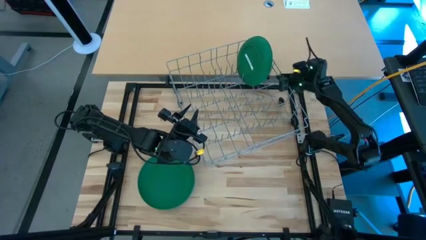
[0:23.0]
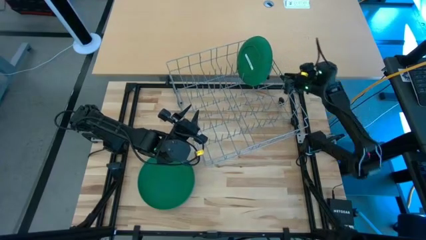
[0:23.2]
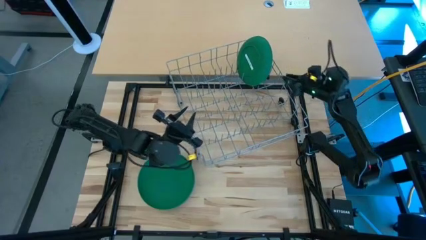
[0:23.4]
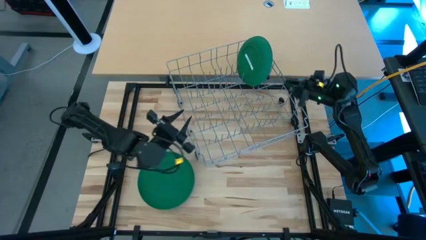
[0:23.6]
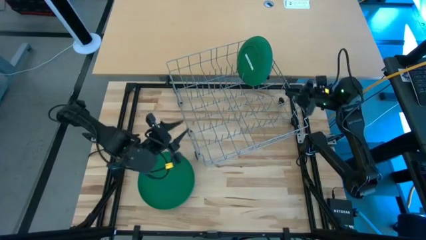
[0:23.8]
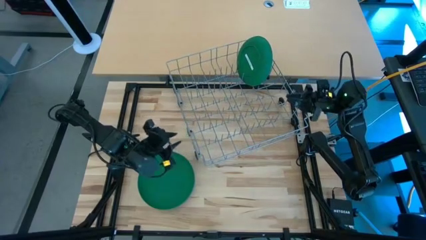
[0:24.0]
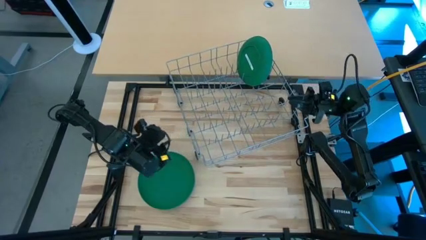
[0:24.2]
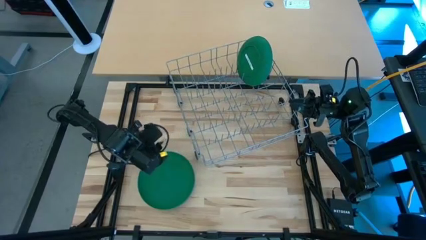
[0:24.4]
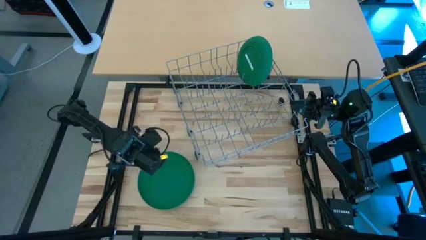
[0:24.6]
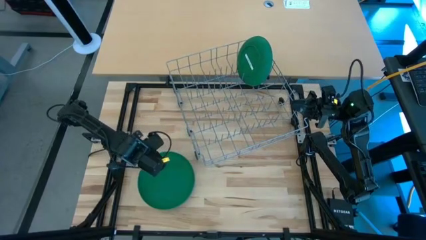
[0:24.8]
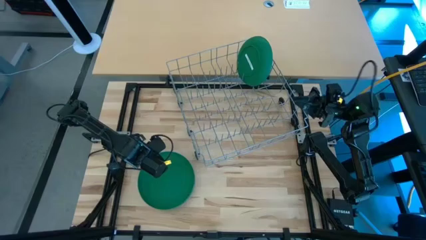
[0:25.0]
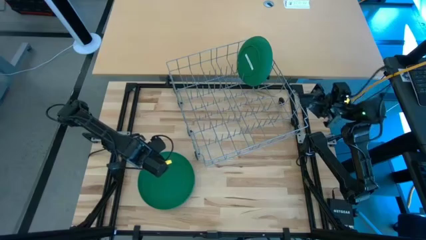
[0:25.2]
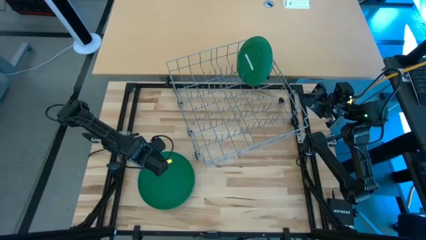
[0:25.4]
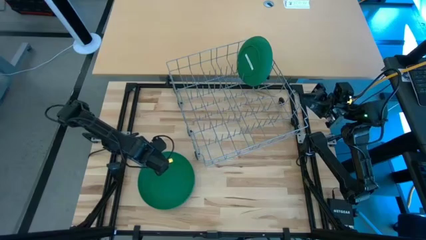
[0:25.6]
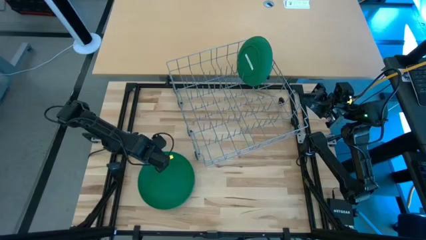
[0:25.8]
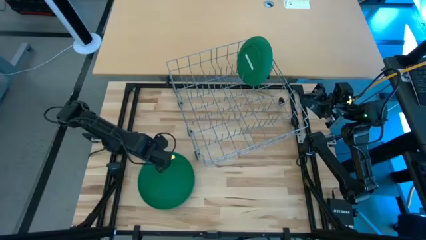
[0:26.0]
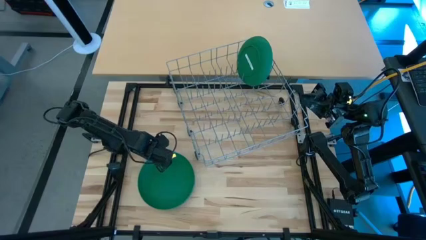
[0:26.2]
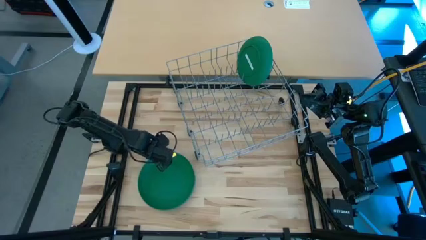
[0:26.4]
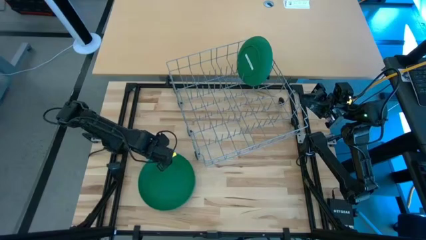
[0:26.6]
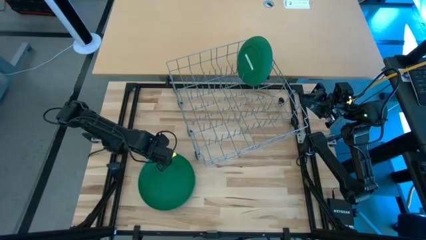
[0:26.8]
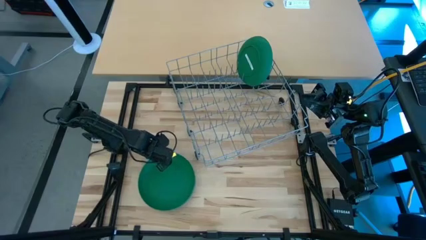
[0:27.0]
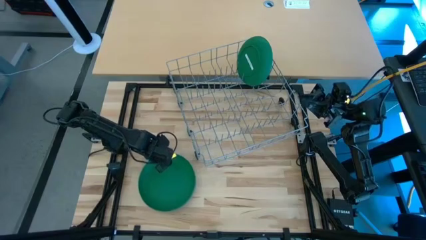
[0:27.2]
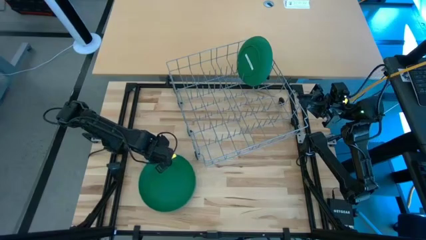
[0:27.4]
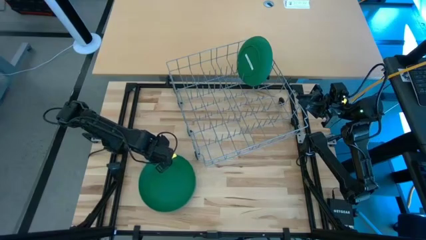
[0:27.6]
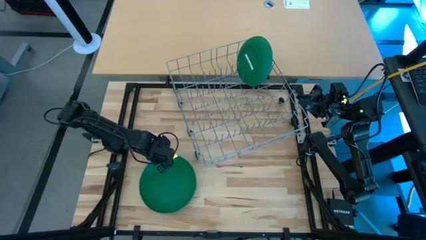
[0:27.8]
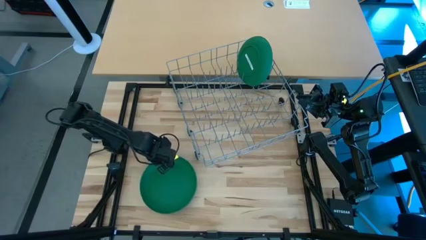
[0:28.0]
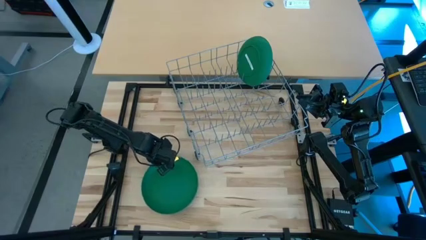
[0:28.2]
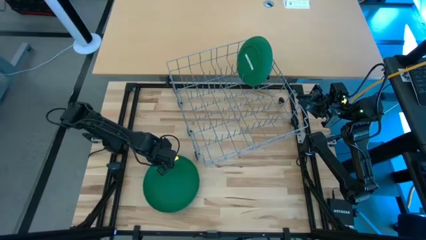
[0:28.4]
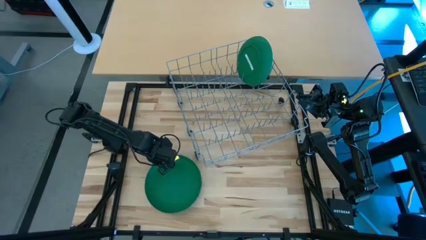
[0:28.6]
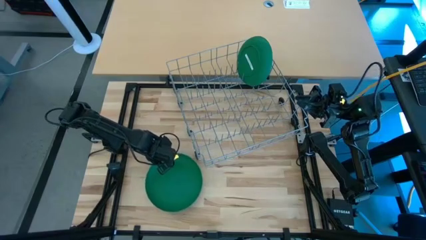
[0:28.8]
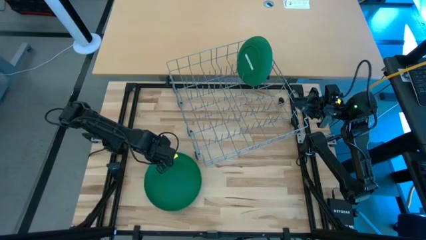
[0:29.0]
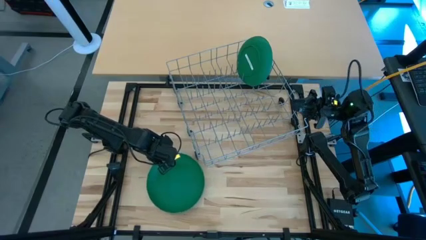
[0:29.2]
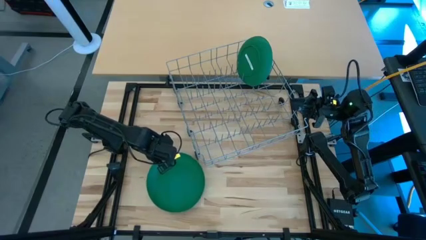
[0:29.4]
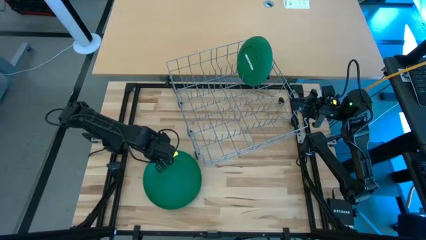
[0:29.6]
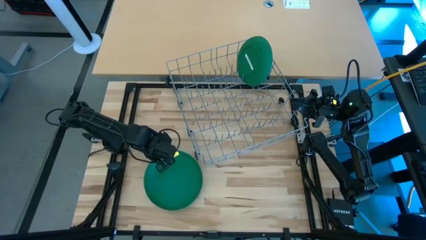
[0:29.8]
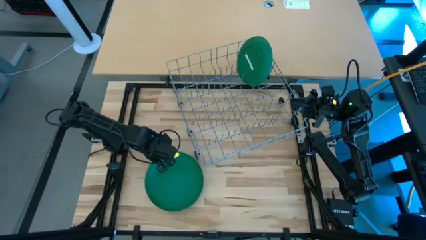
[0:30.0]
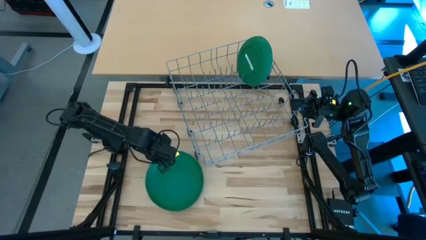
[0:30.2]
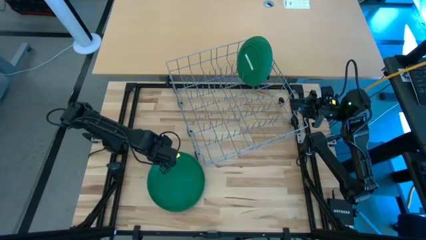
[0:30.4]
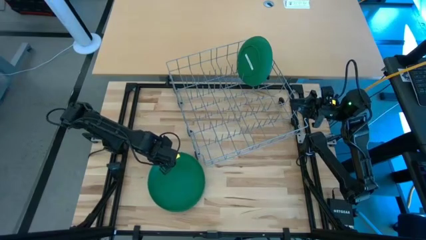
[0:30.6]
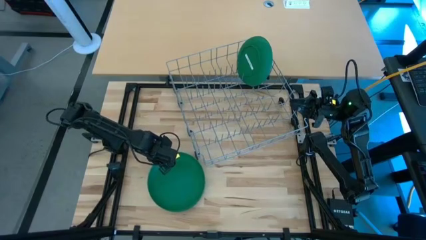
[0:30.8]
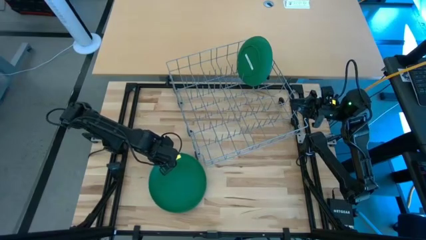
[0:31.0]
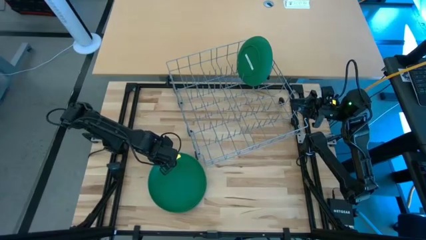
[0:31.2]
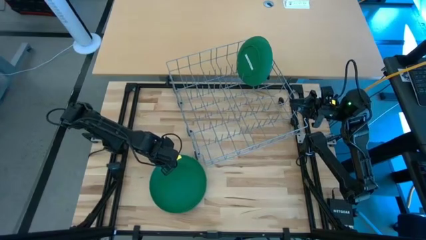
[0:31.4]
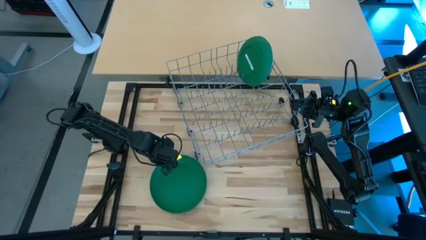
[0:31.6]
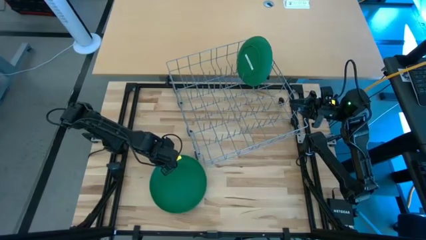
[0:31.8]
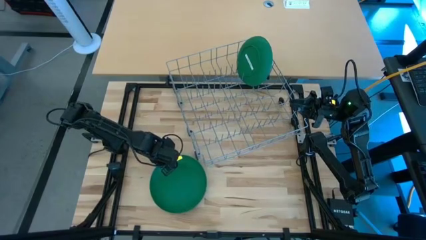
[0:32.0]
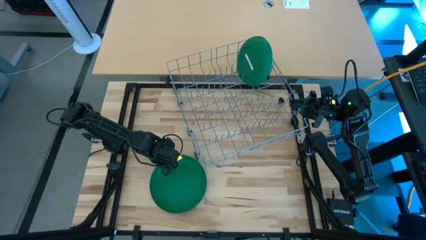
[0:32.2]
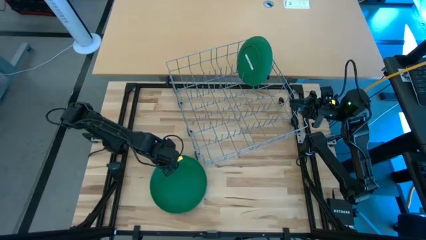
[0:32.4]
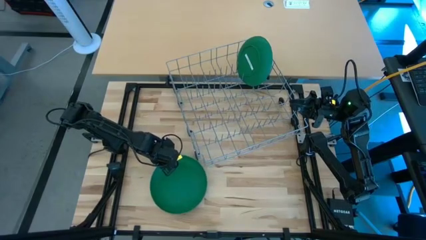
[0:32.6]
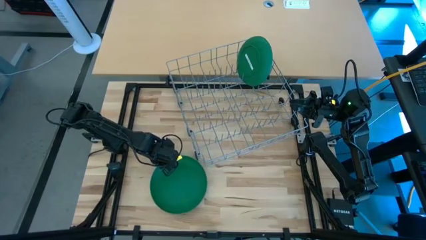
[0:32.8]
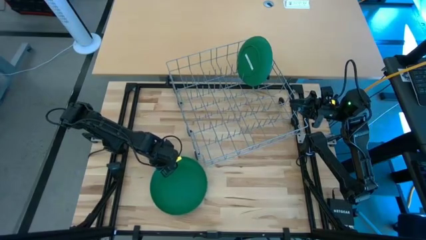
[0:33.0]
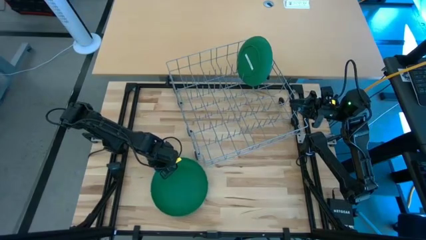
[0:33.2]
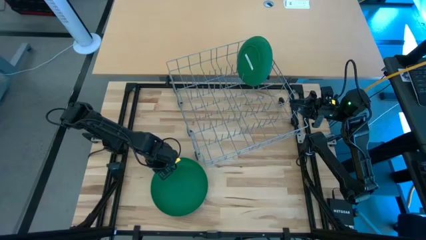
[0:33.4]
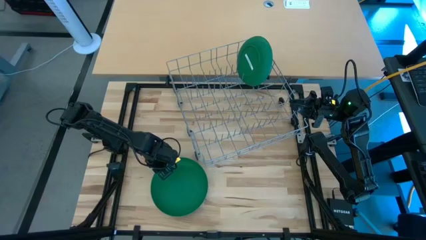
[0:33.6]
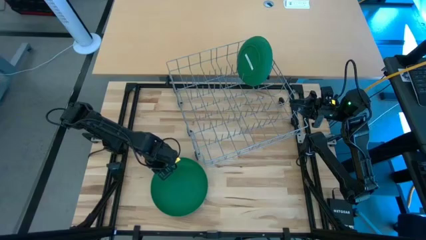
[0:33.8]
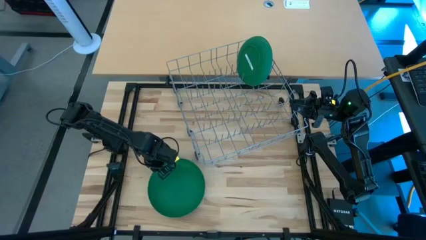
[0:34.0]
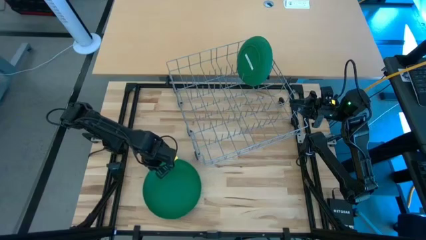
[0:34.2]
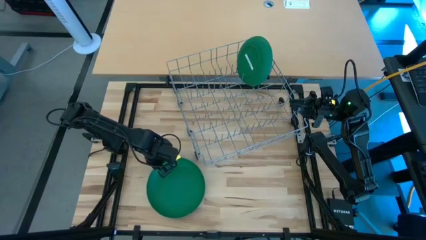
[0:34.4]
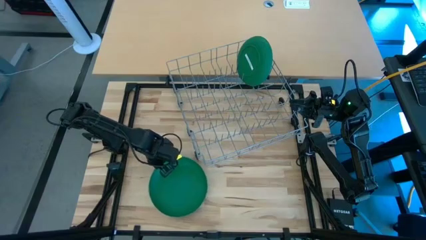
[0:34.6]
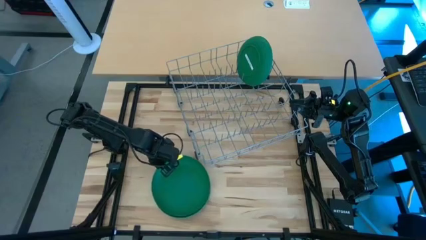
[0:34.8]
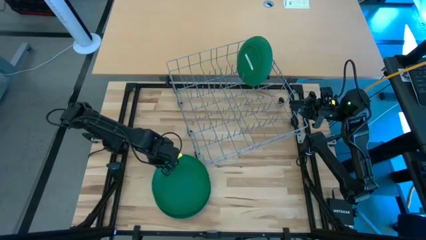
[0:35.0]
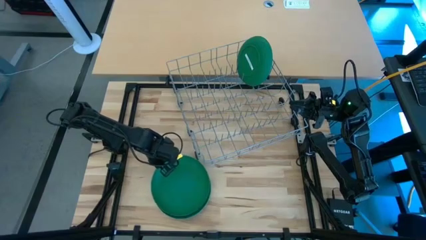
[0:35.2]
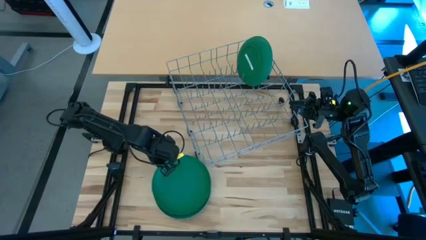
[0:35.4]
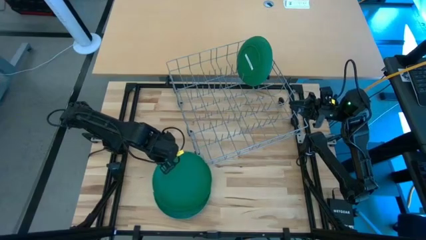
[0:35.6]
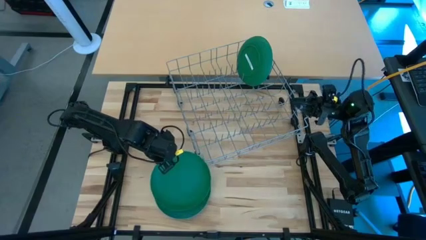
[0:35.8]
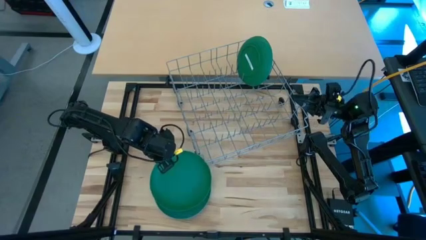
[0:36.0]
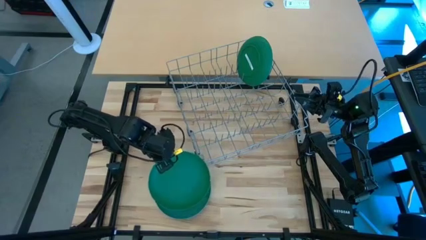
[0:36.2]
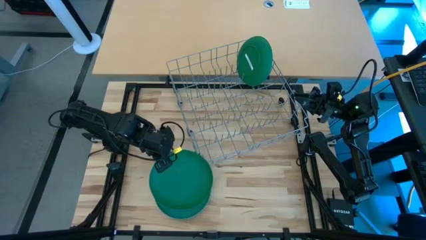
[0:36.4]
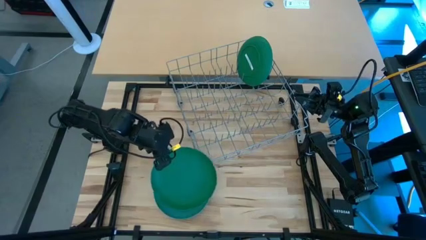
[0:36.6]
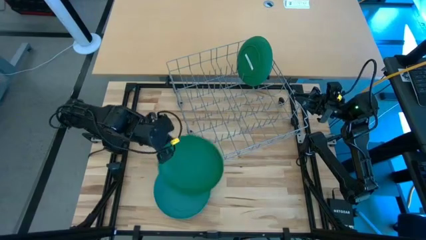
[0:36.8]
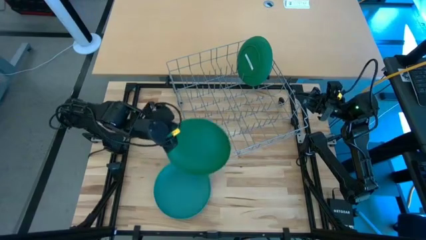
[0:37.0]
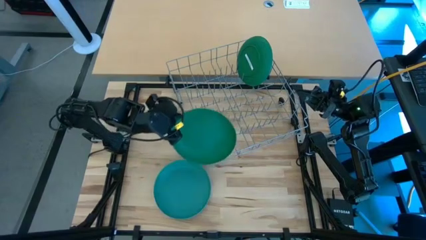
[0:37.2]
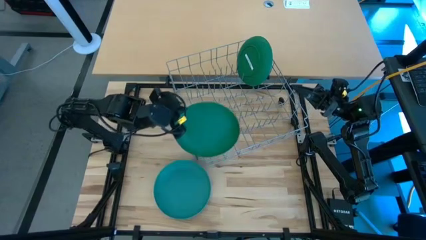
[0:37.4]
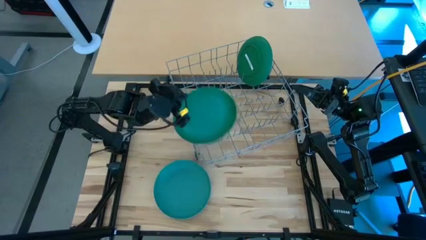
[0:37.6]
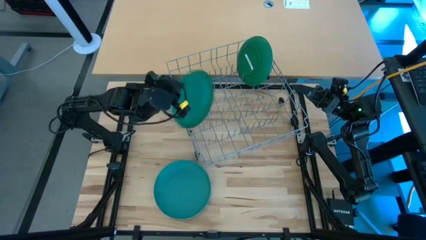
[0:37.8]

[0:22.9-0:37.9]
Task: Sort dishes
Put the dark green plate in the dish rack
